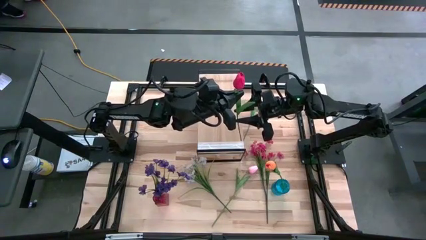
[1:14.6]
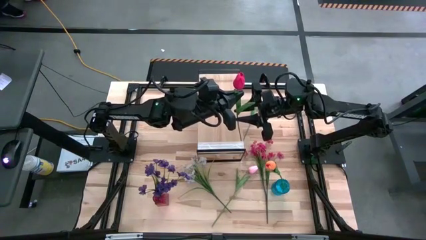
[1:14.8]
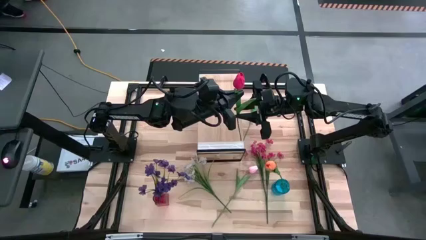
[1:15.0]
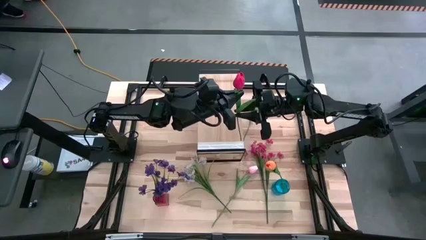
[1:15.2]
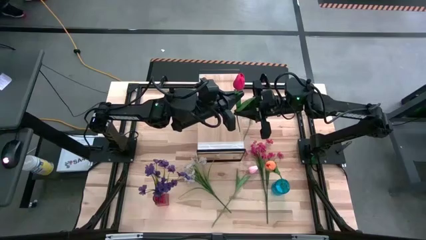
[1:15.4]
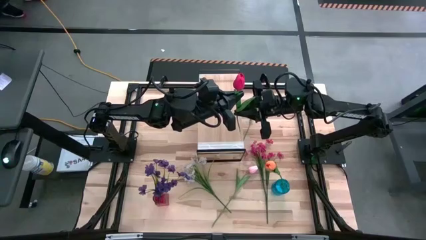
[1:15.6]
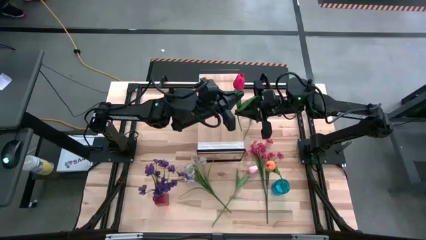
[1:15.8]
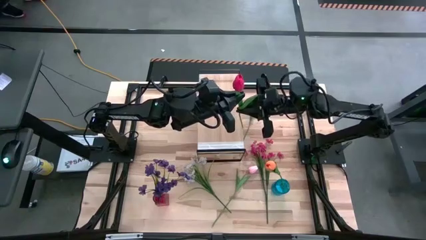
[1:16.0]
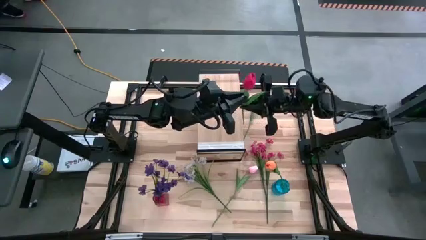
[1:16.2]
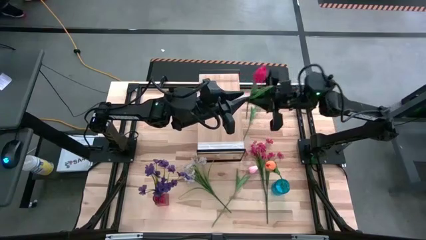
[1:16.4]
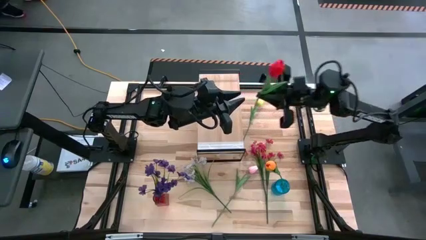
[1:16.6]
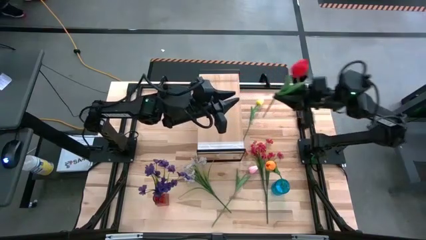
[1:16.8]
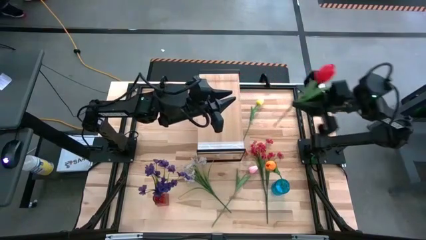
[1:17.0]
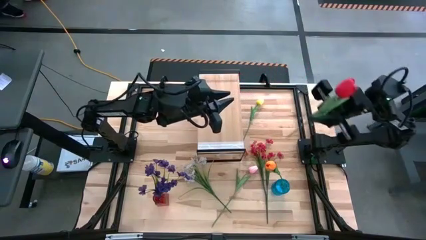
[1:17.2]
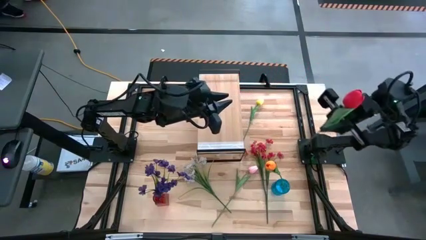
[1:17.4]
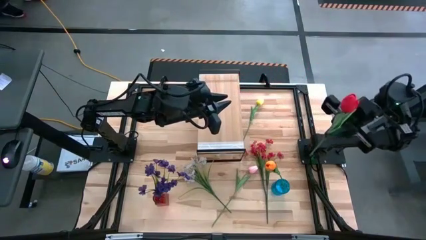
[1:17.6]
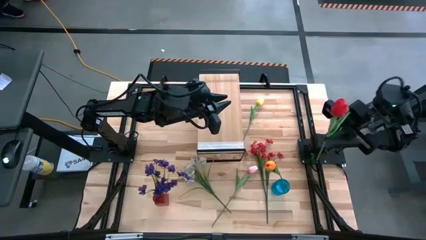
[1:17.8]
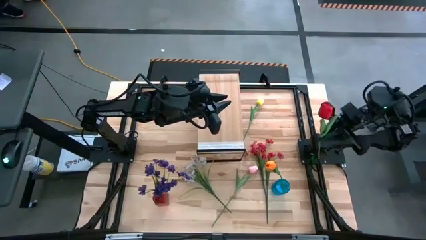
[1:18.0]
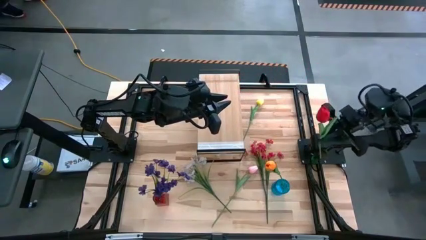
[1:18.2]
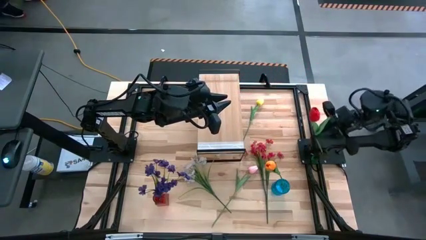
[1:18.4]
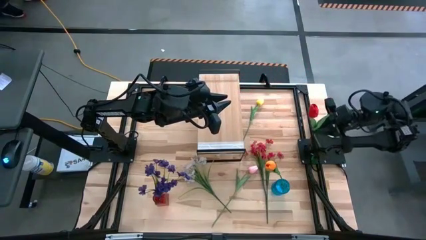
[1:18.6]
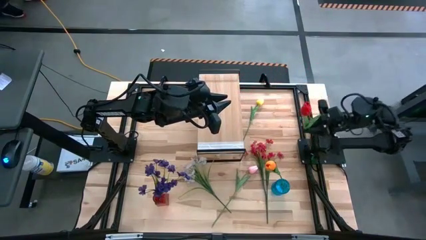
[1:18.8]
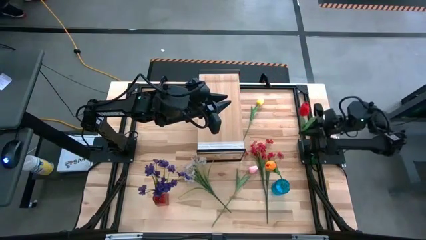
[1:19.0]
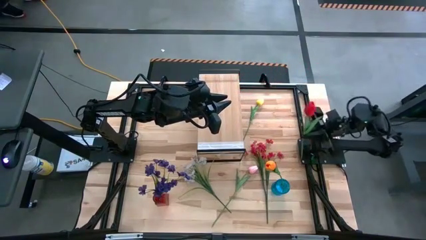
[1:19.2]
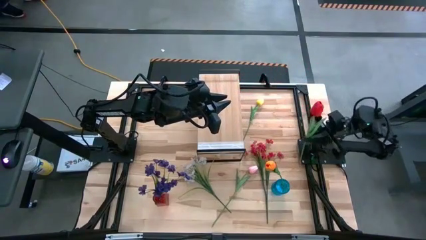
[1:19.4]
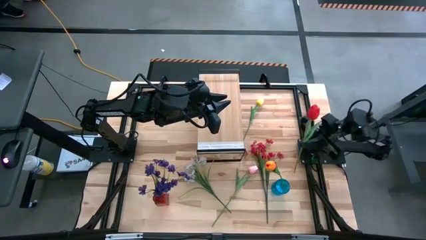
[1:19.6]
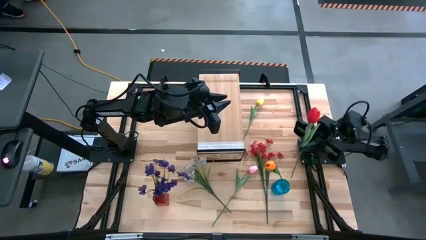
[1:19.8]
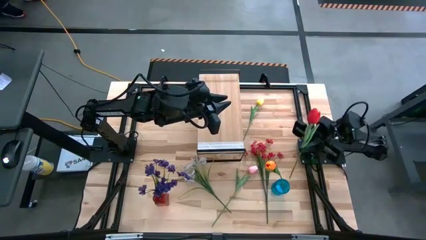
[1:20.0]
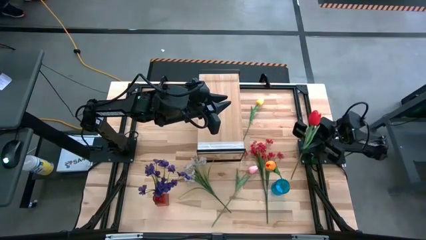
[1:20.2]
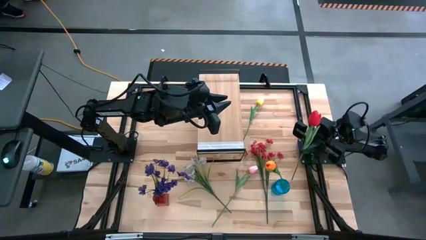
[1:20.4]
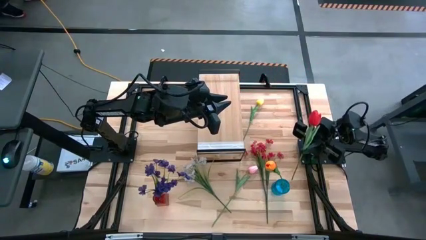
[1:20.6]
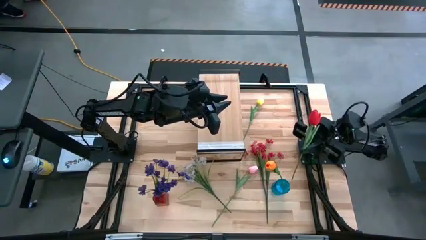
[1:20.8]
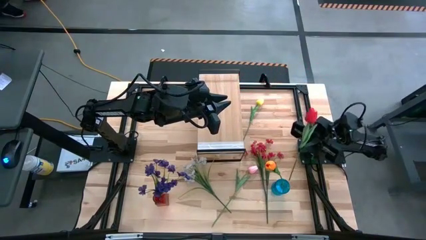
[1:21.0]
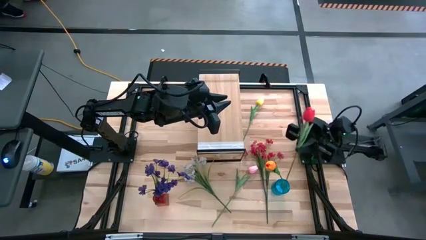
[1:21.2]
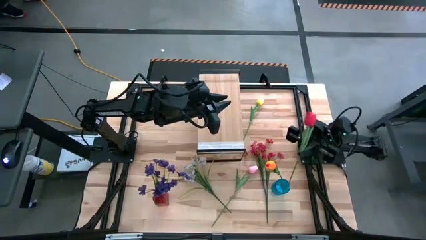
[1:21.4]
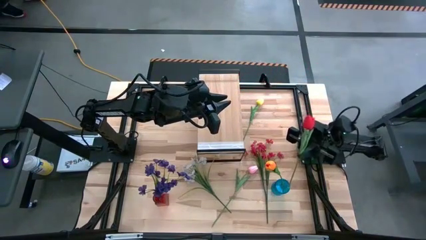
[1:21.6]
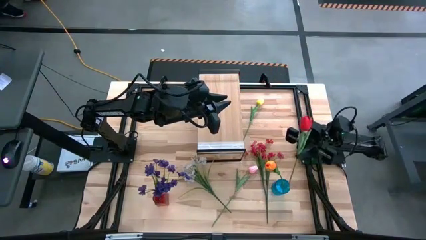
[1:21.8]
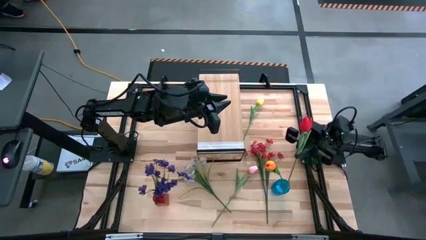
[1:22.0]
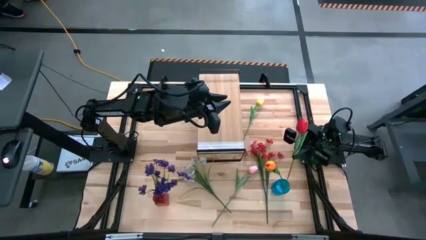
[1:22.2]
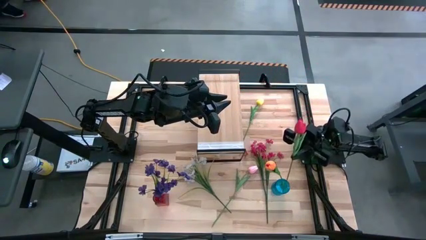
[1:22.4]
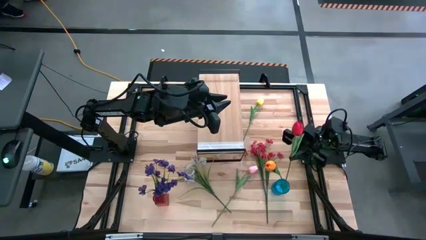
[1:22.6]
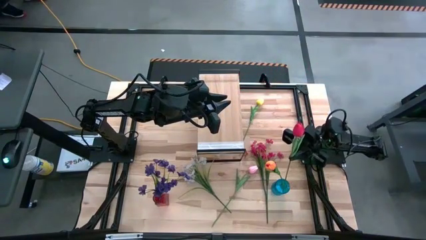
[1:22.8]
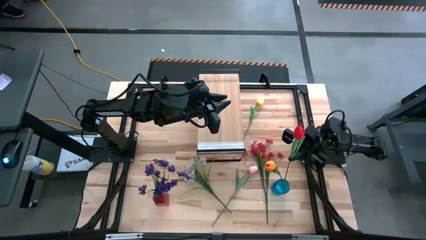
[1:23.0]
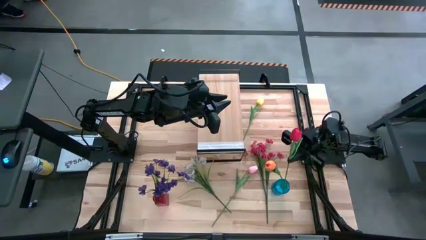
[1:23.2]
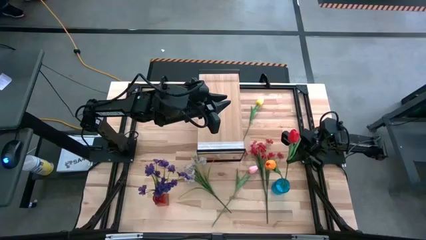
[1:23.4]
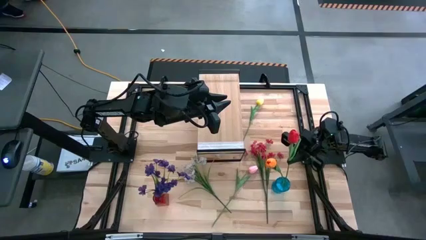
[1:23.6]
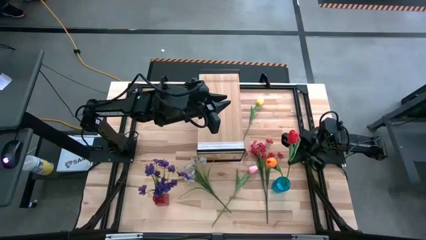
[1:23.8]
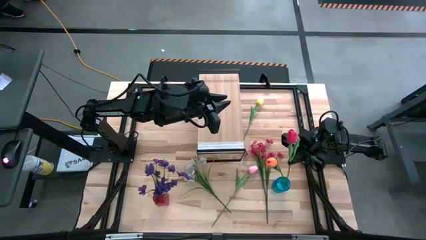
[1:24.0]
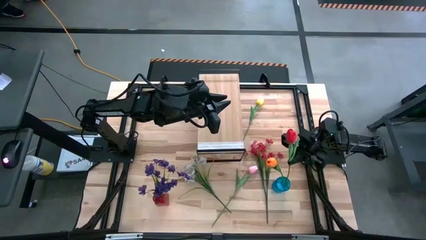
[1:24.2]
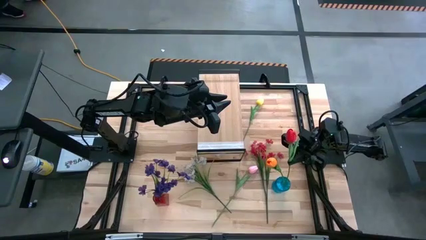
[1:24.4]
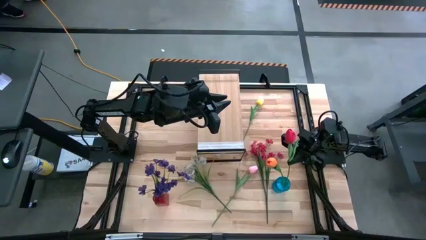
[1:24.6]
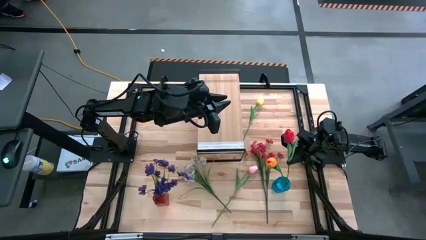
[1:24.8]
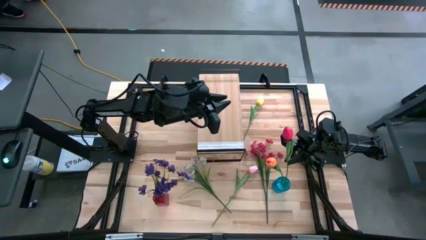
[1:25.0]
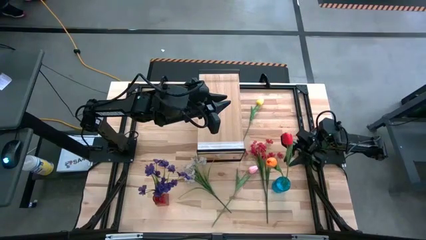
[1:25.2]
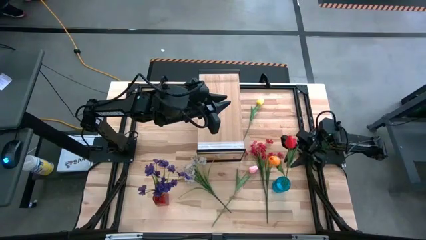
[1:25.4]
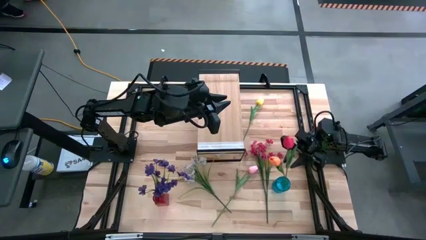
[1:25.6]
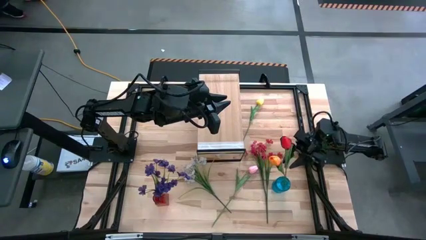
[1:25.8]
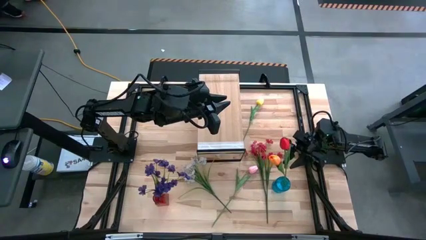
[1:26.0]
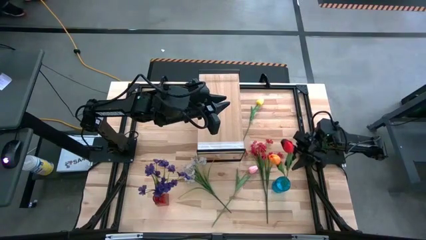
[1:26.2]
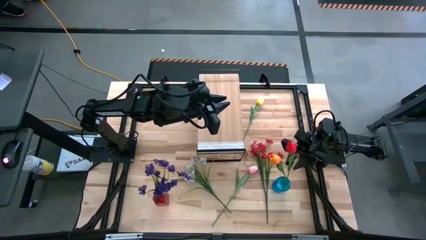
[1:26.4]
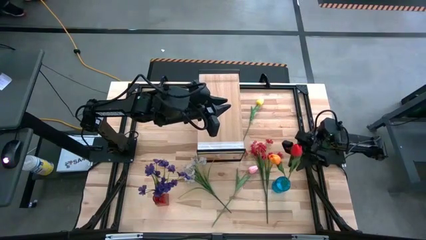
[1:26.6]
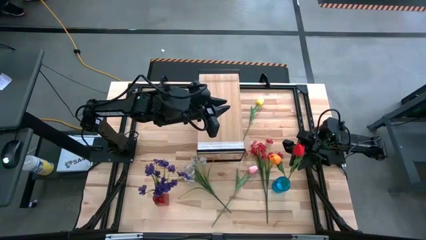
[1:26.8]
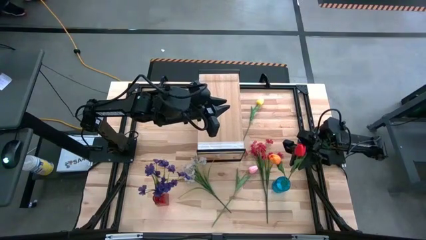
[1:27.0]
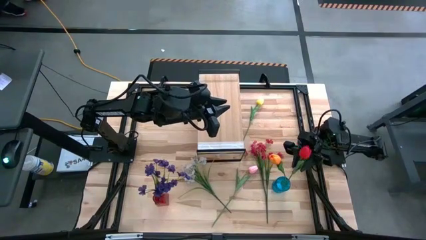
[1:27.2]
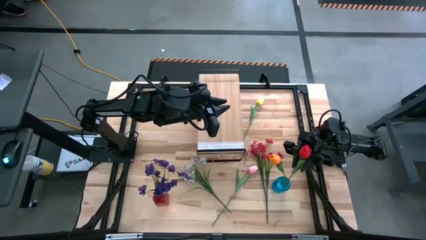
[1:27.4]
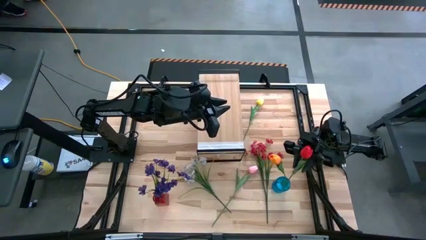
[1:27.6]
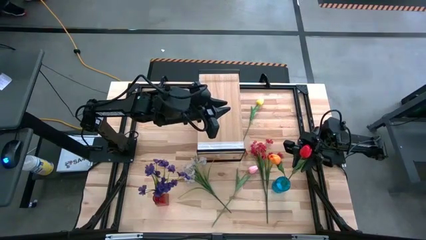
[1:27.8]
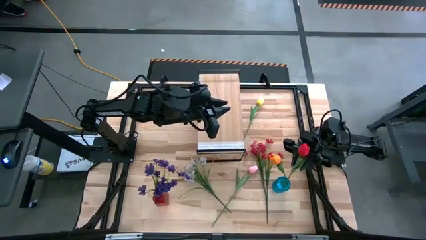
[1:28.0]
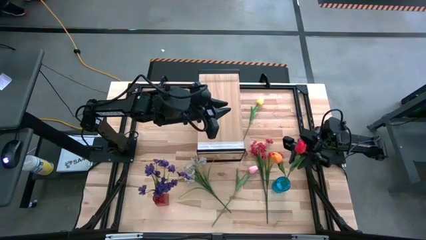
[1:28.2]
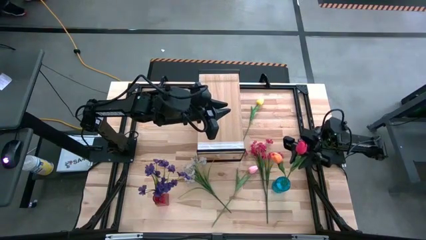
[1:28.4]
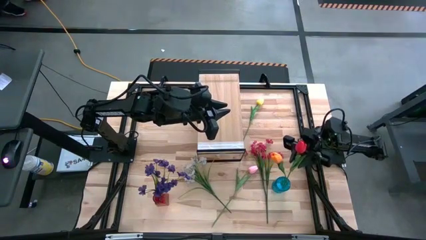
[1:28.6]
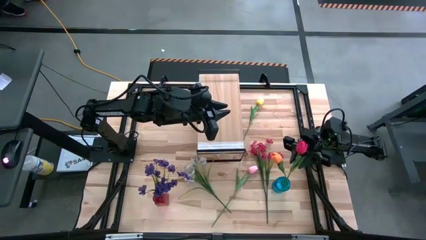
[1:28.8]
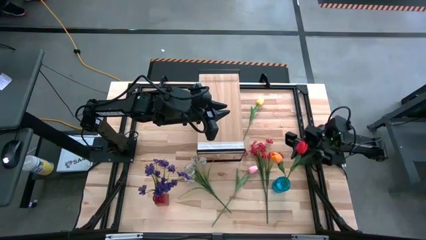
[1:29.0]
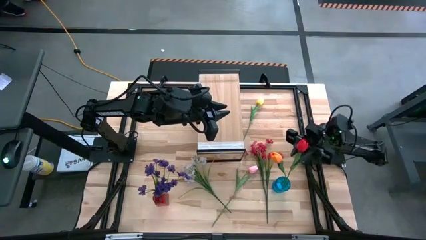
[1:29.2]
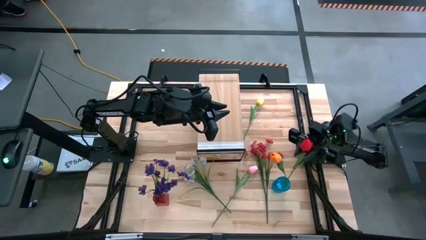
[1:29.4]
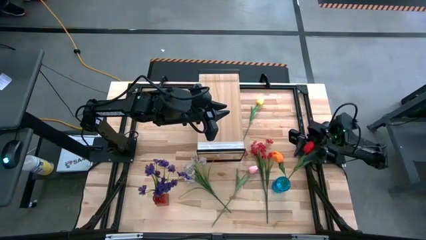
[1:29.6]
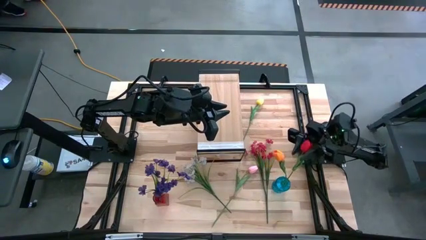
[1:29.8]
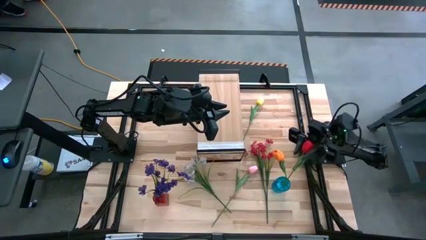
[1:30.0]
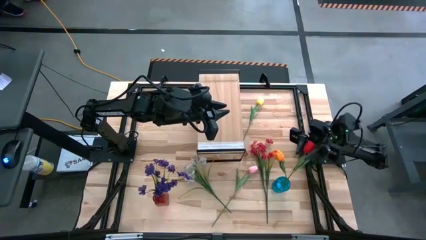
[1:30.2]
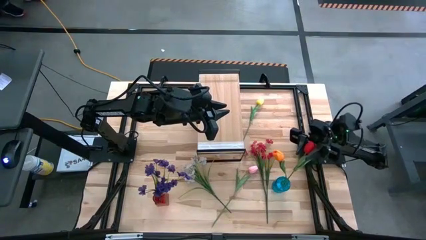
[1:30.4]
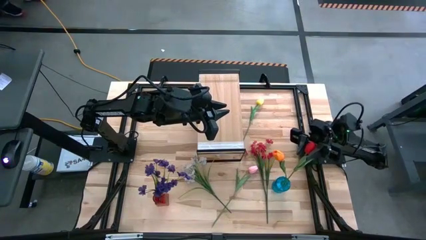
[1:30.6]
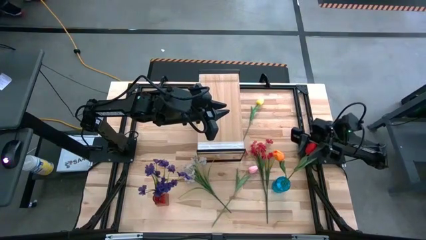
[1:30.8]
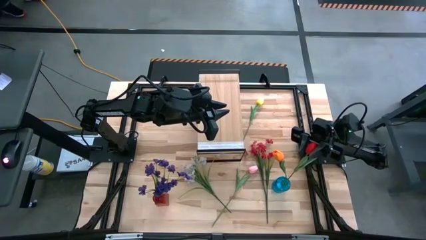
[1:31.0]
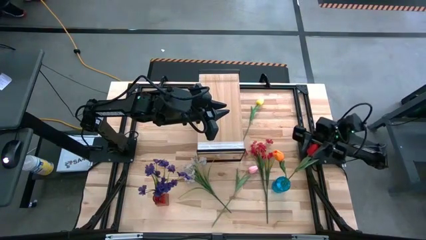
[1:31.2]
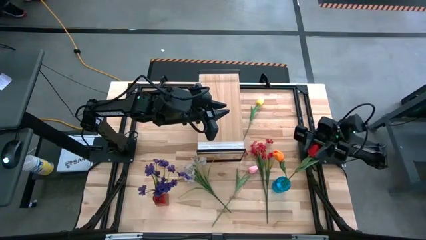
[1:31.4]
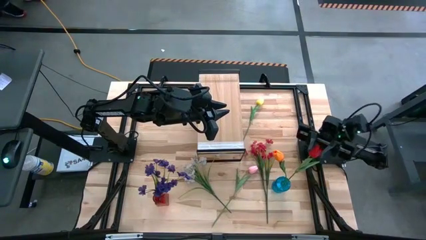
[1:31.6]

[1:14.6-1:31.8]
Task: Pick and place flowers into a vace then onto a shelf
Put the red tulip into the blue vase
